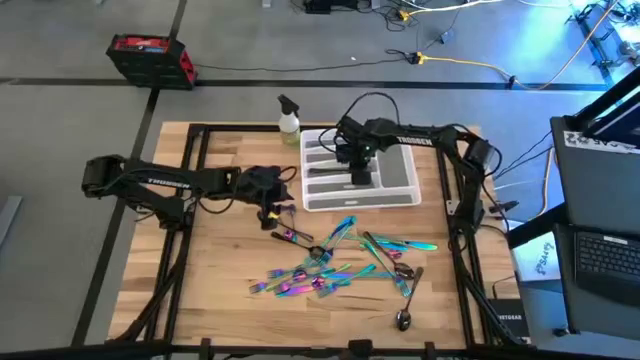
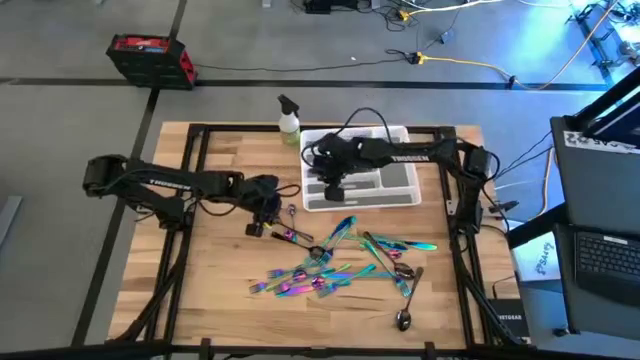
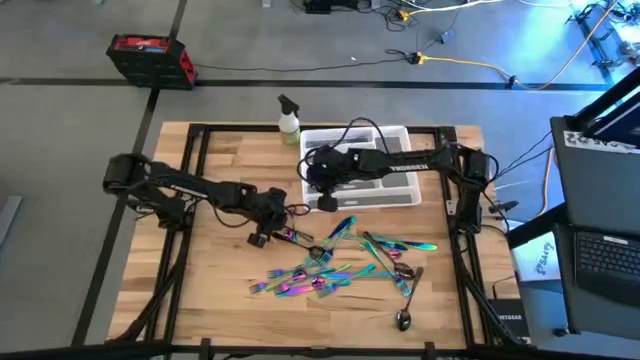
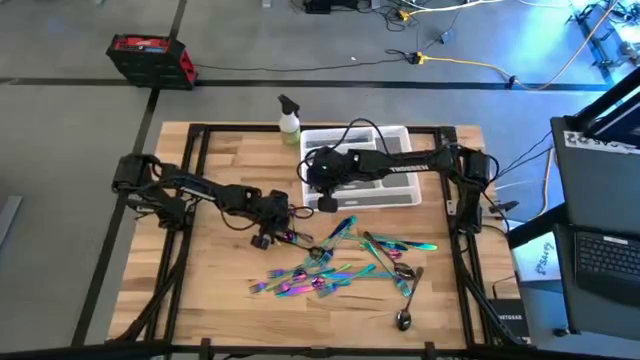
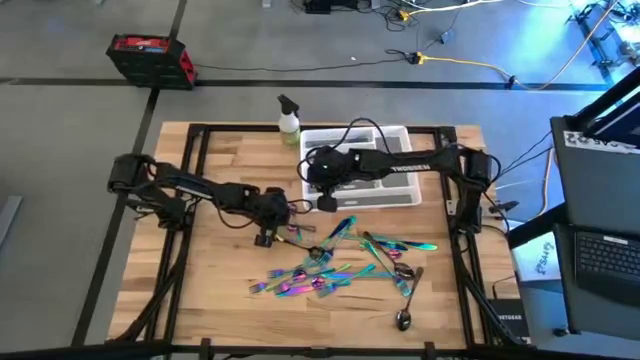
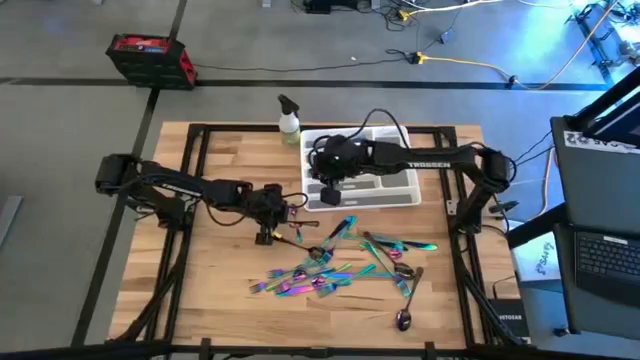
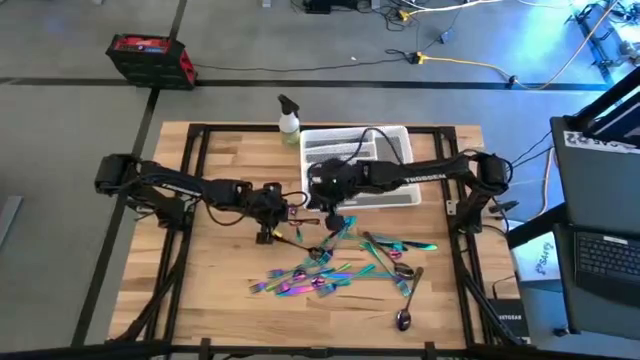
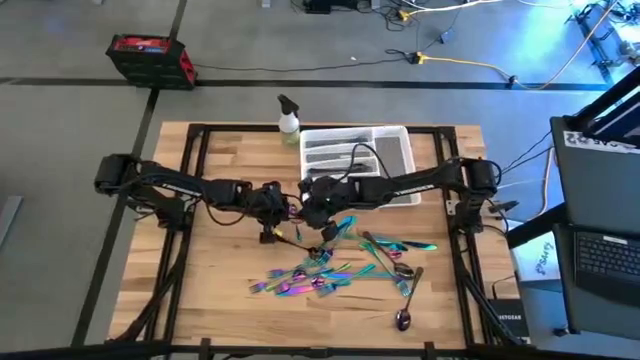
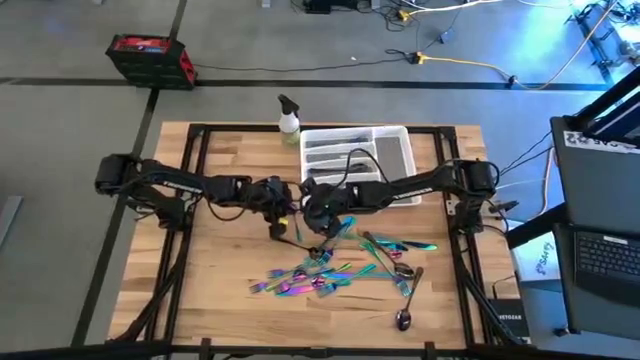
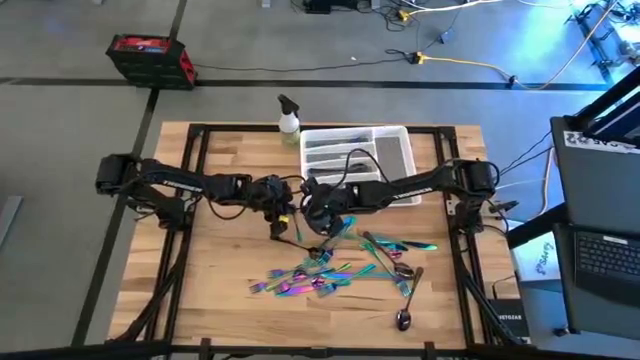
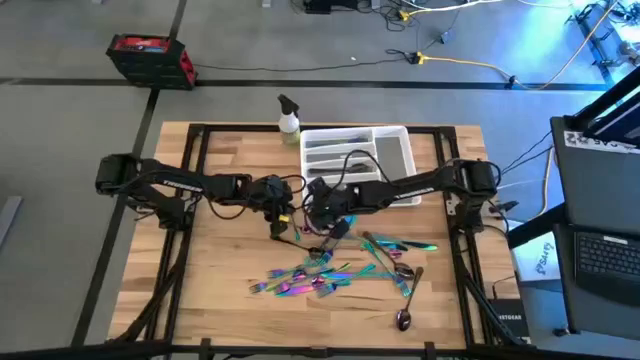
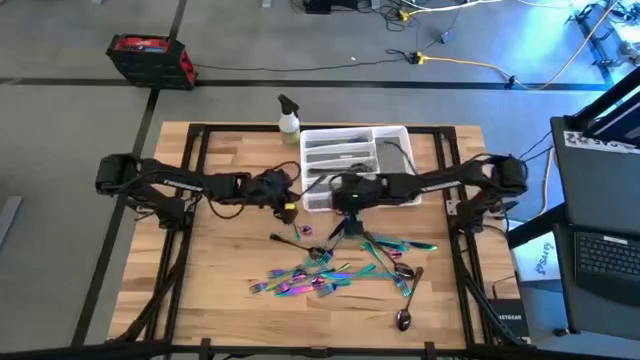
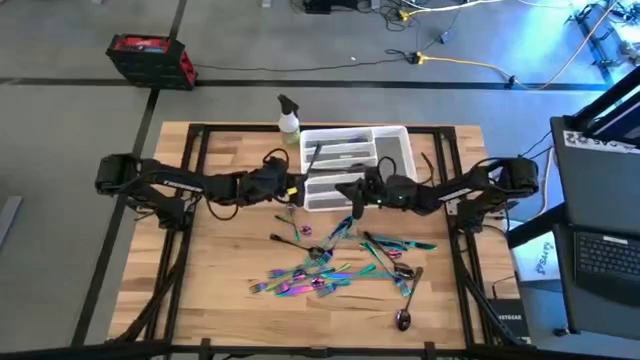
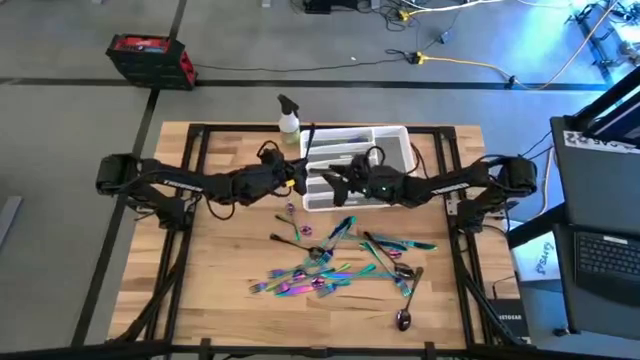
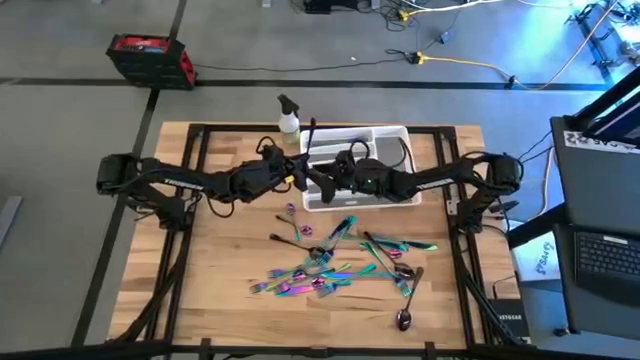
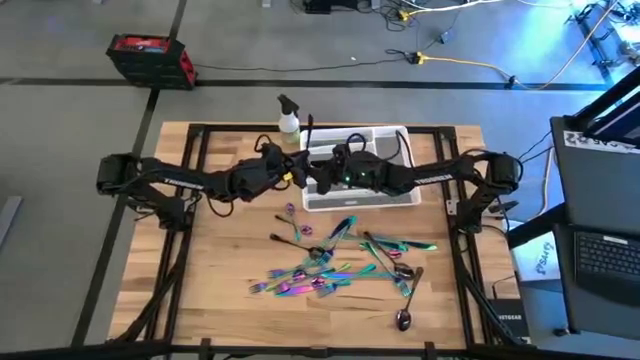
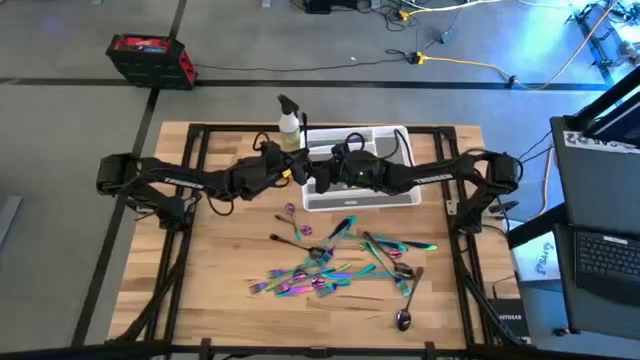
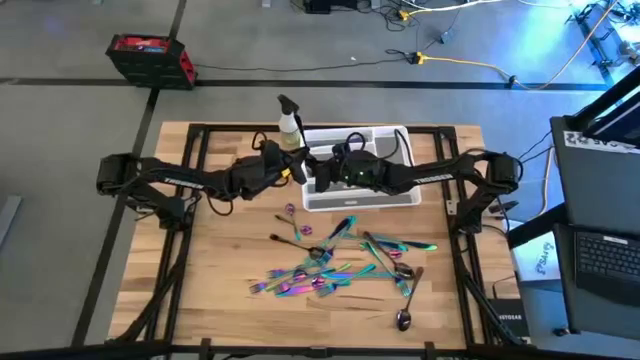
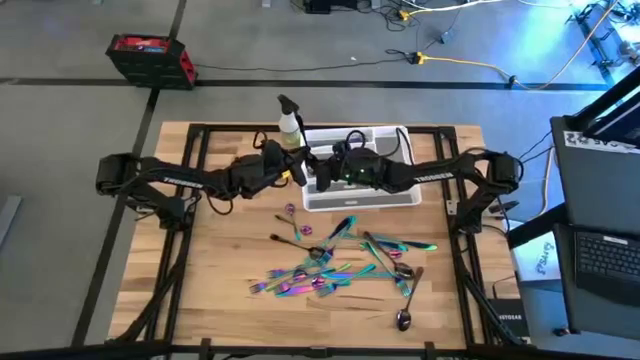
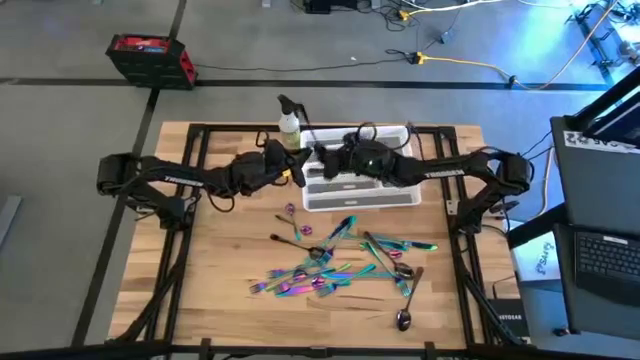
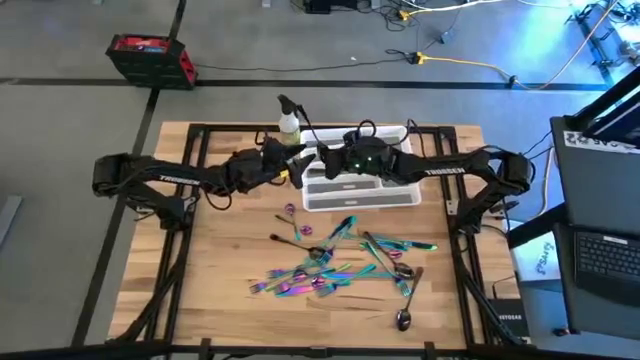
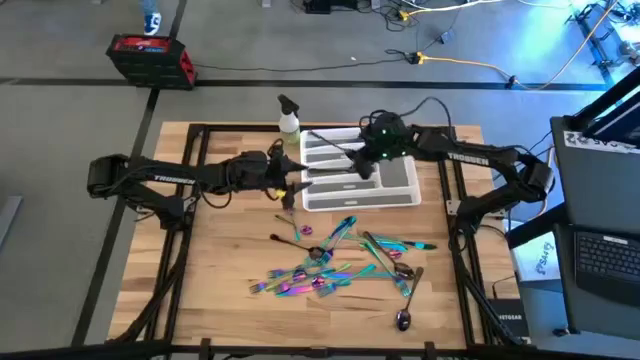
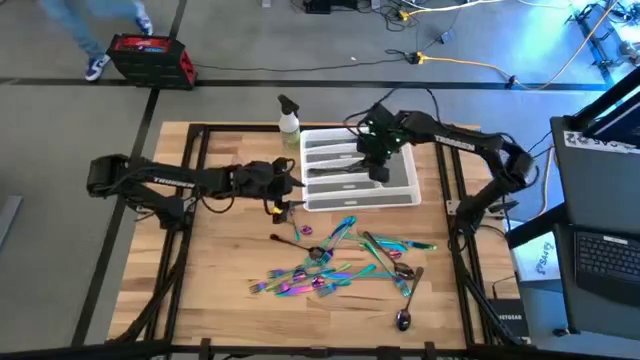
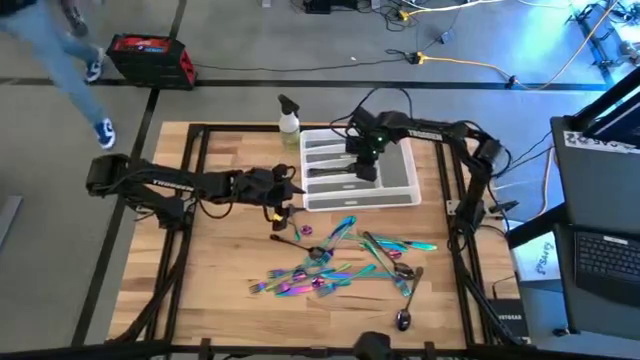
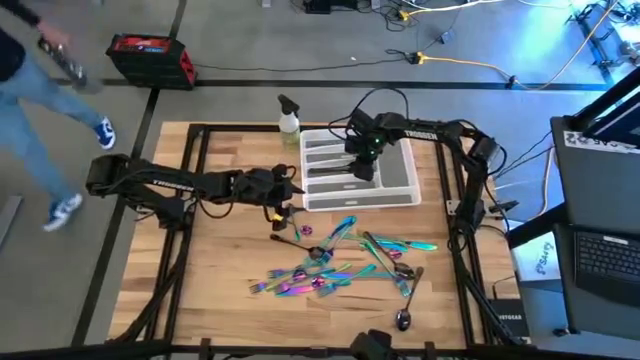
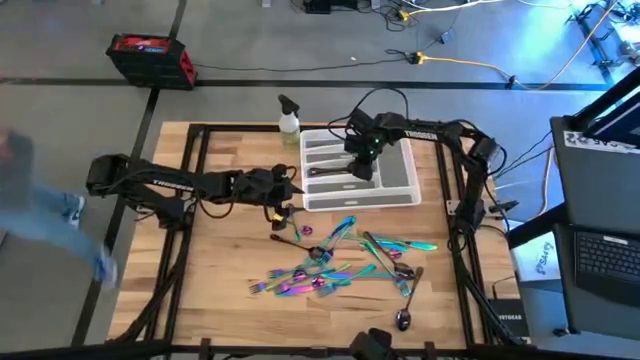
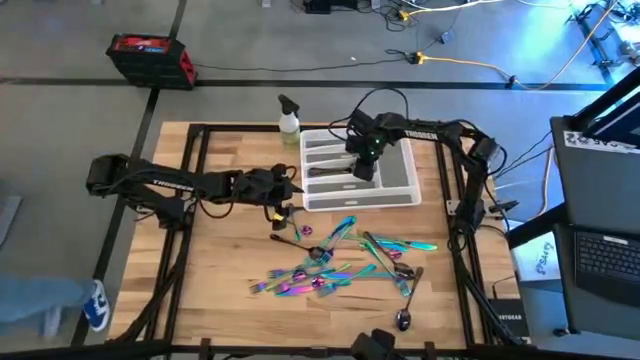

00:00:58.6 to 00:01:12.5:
Task: Sort silverware
Put the black spoon on the white silverware tray

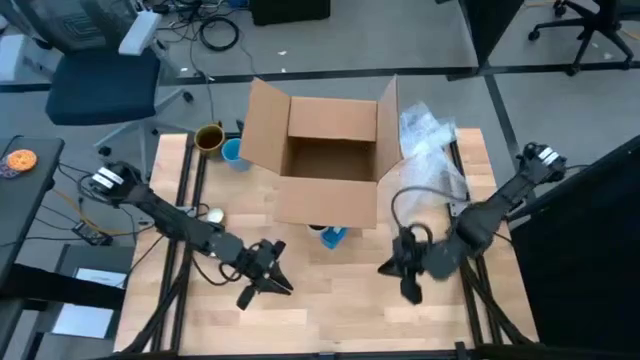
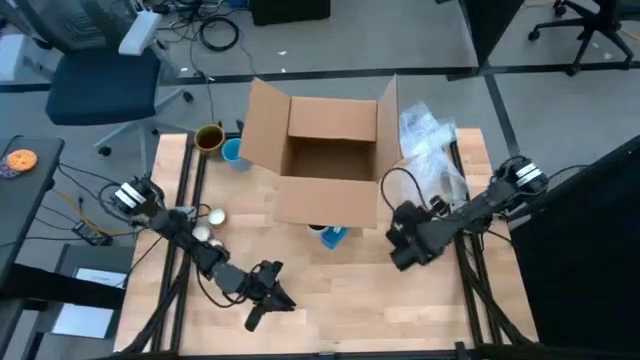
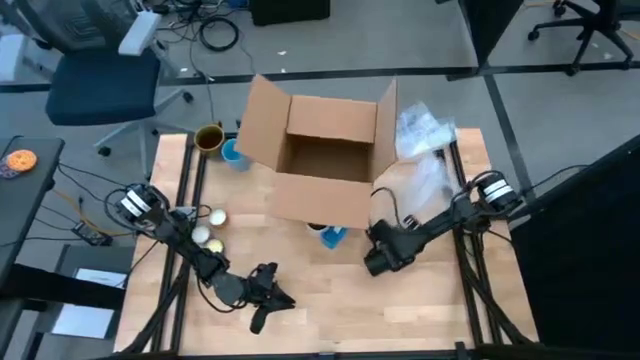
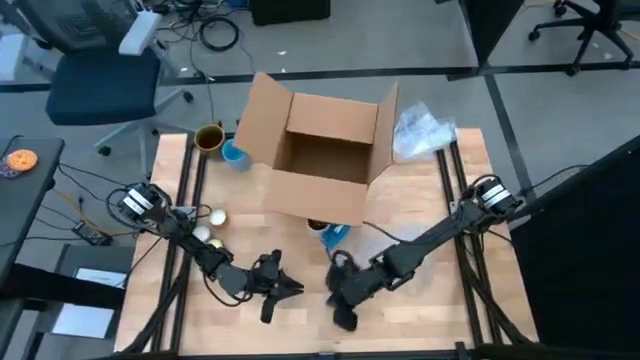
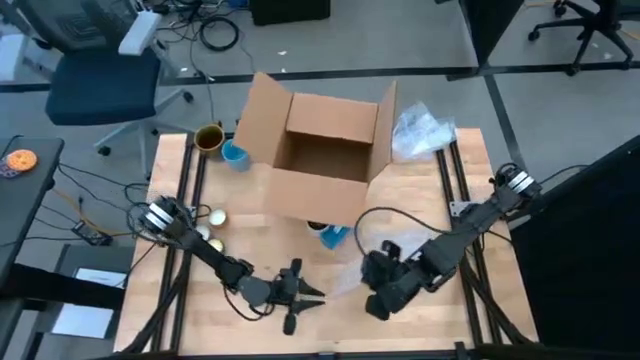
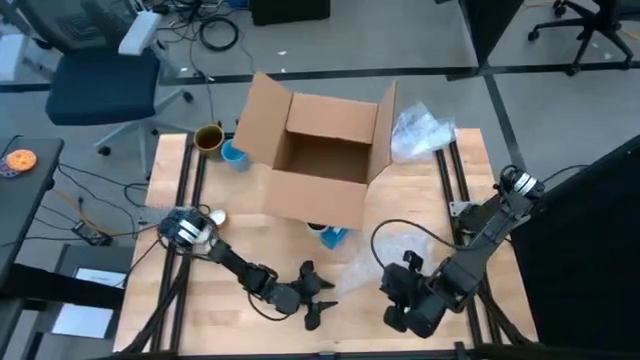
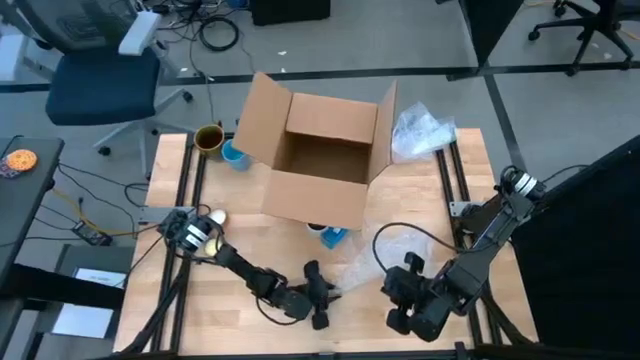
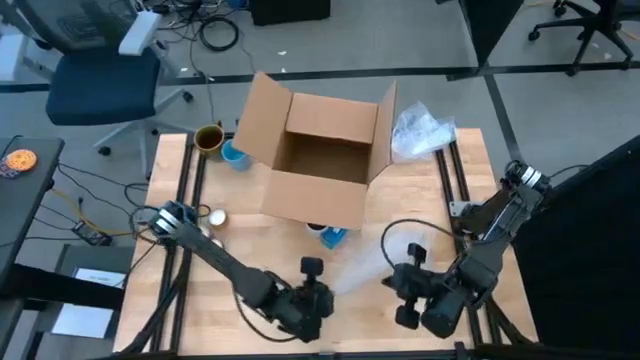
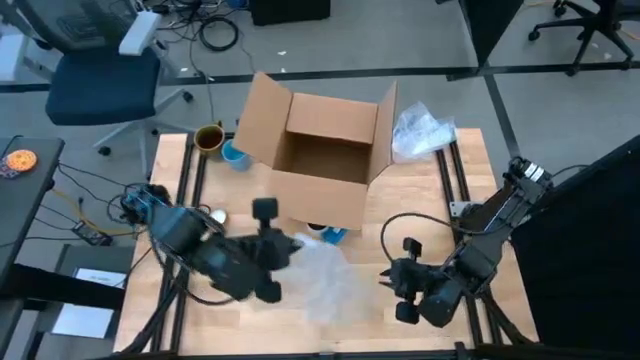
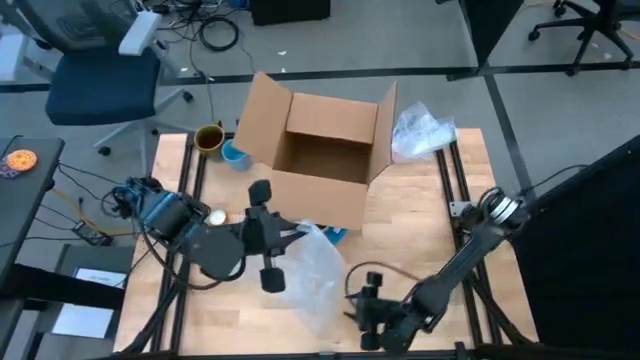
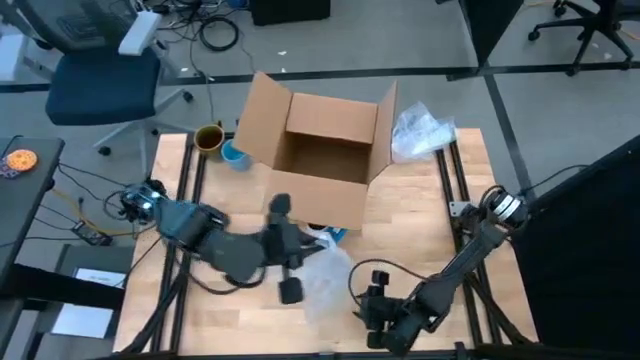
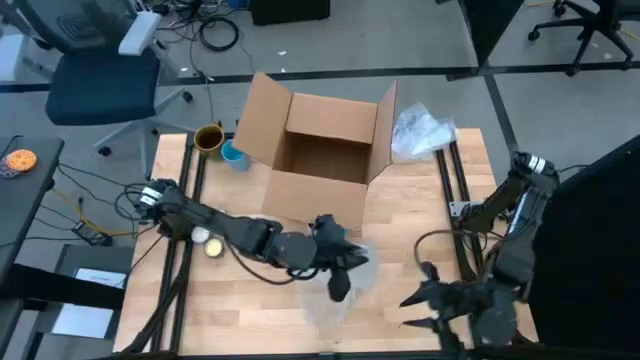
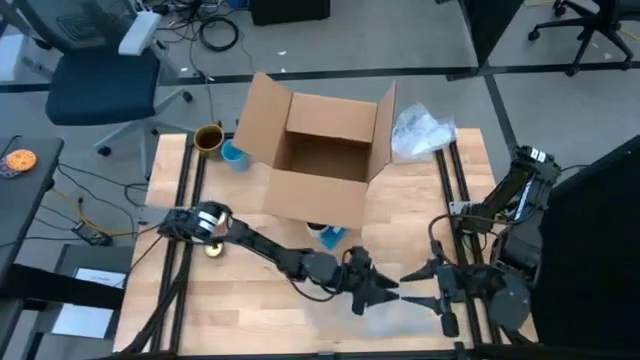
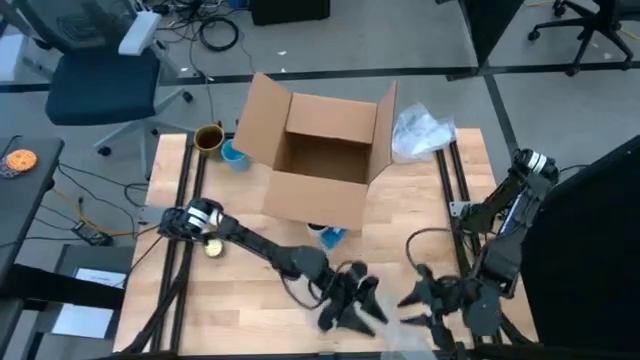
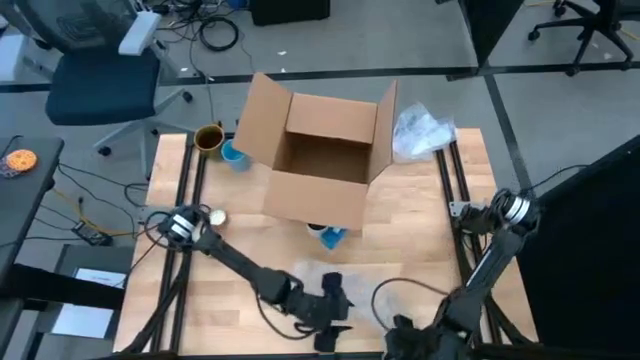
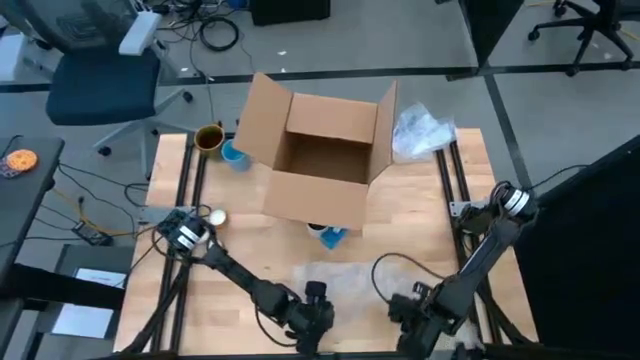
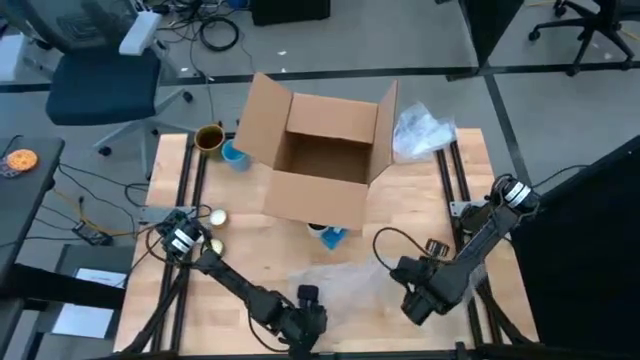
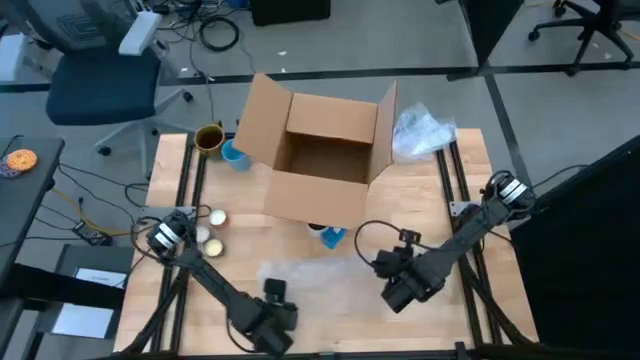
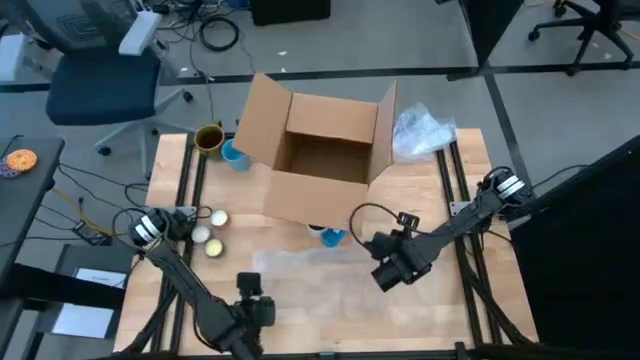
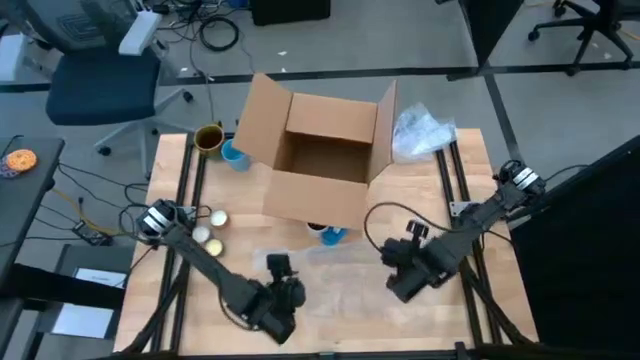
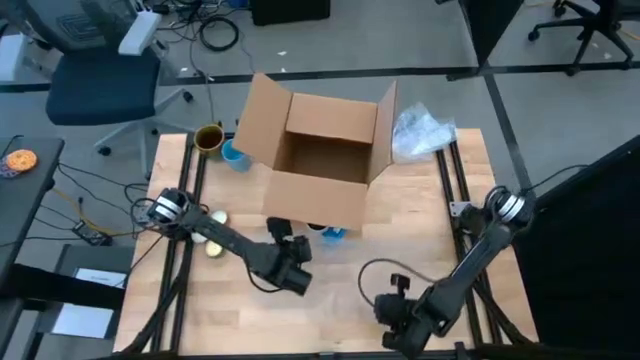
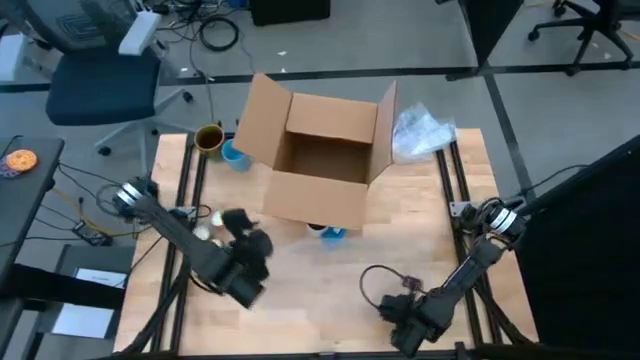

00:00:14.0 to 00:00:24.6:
Task: wrap mug
Prepare the bubble wrap on the table
